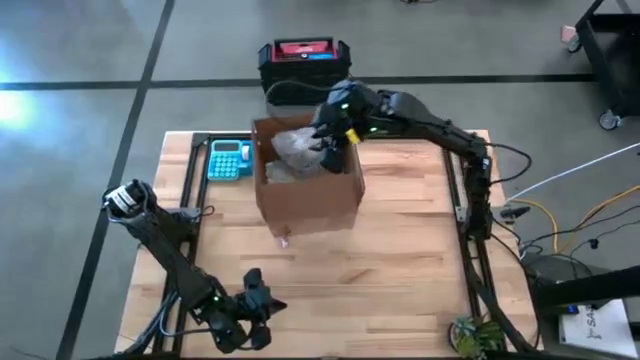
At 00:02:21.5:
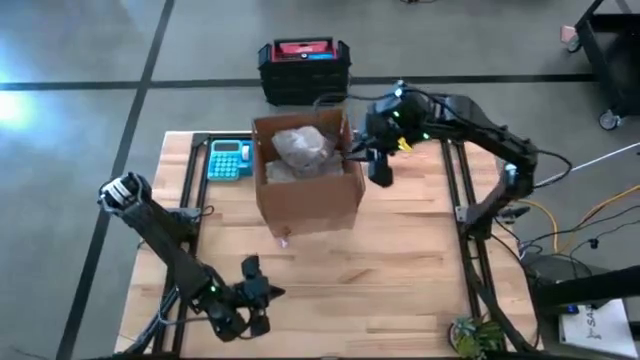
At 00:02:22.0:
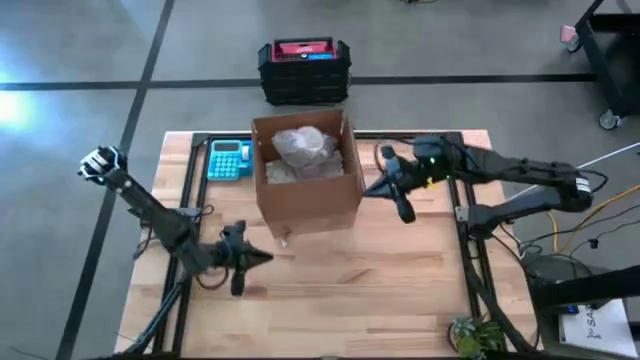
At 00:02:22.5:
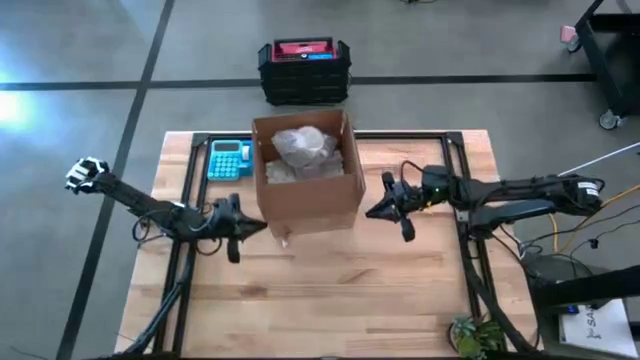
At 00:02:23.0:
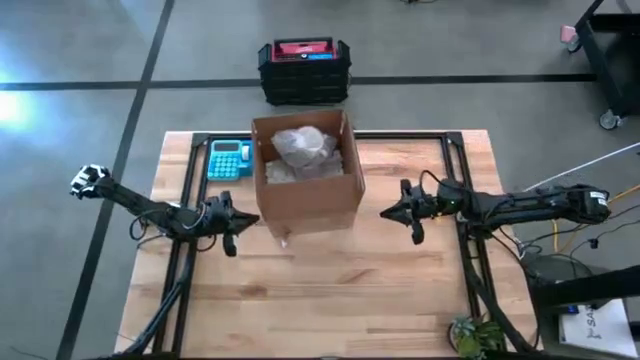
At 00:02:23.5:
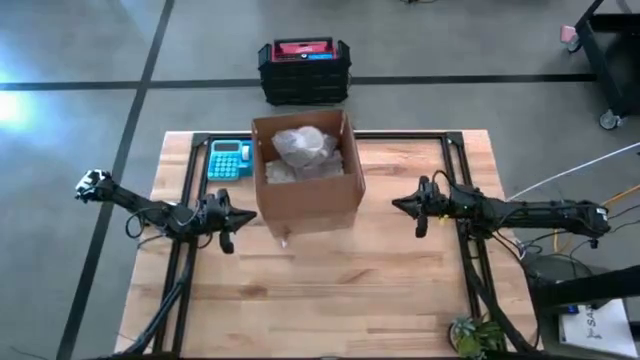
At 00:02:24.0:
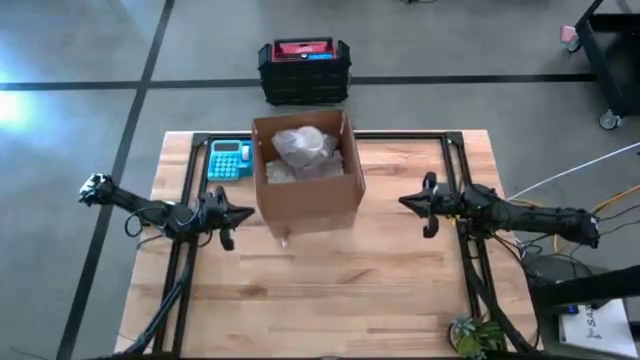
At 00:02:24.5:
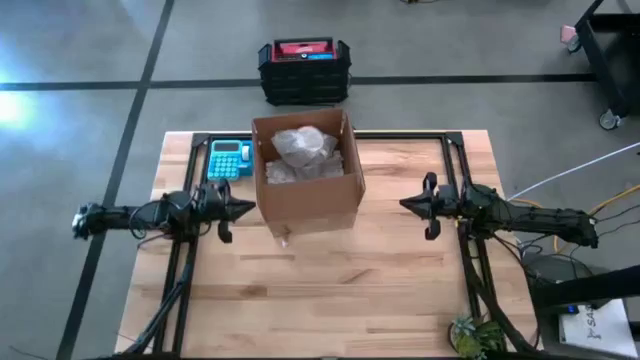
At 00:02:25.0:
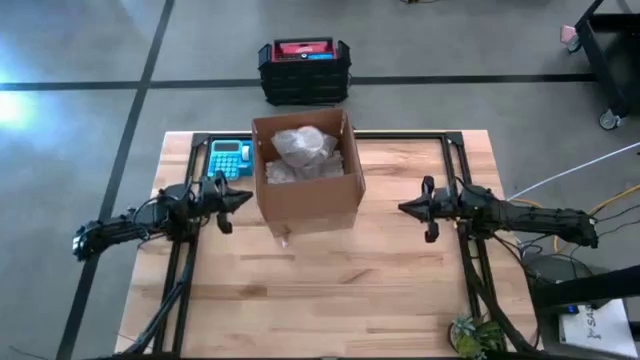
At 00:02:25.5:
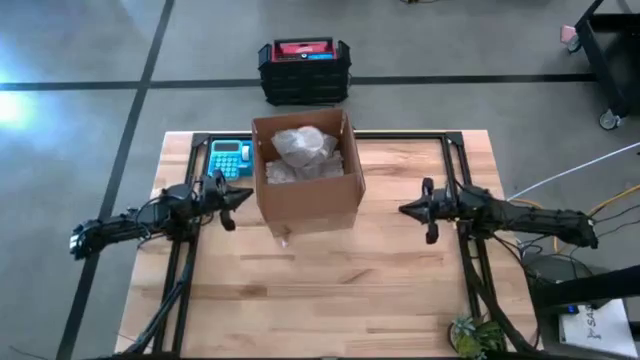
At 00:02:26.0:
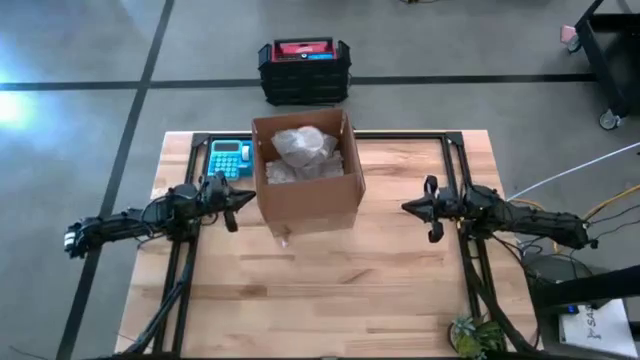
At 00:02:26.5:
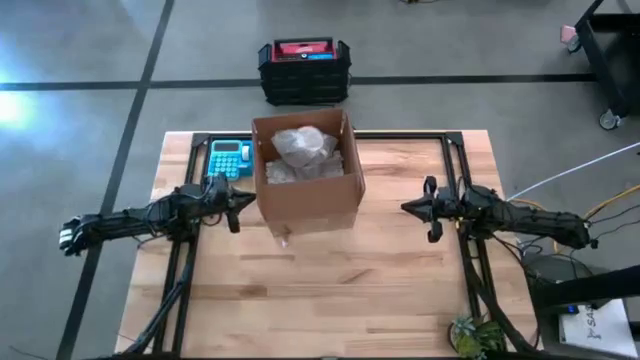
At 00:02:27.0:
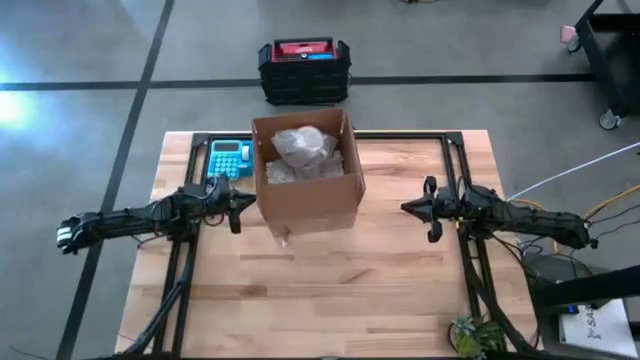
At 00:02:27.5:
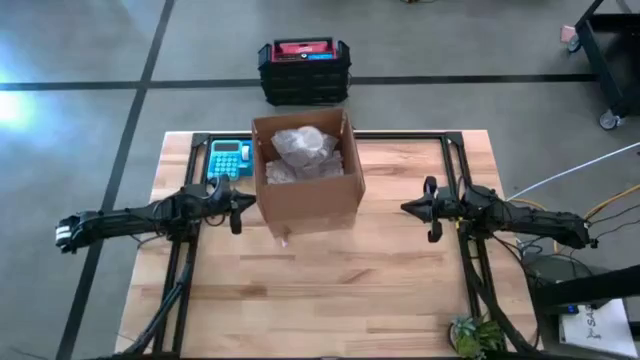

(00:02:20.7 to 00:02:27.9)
Task: wrap mug
Return to Home Position

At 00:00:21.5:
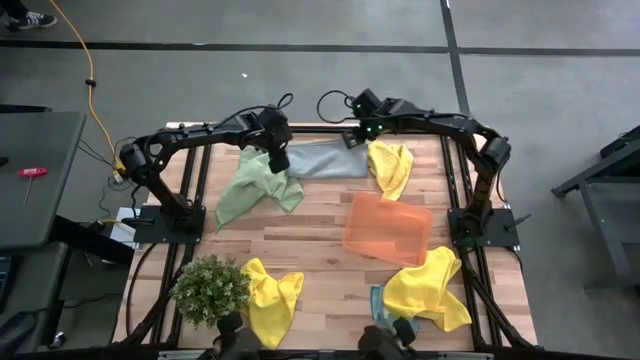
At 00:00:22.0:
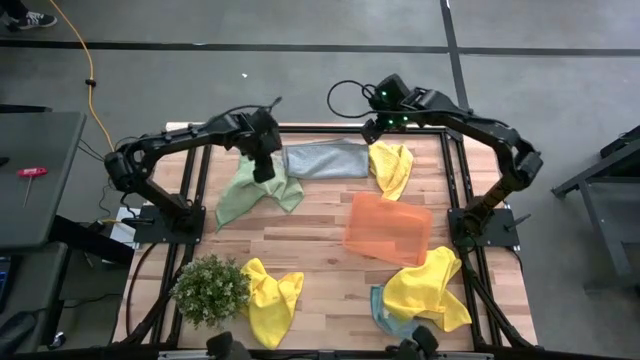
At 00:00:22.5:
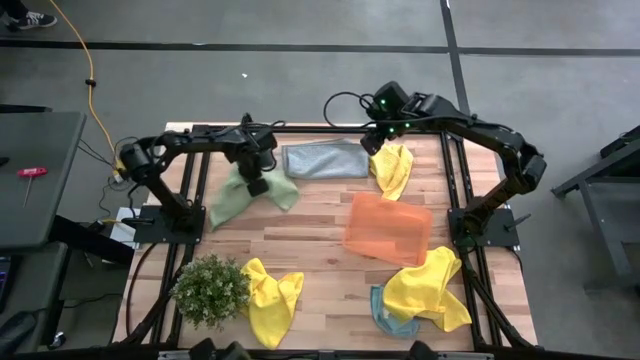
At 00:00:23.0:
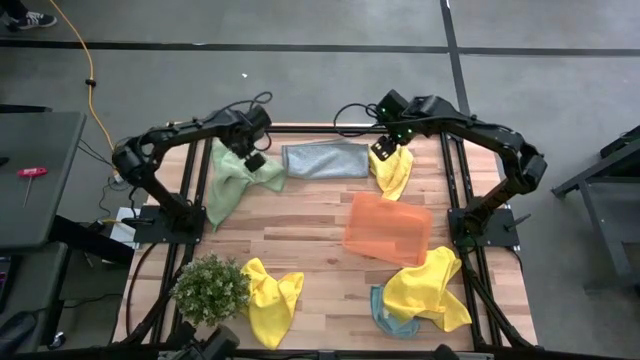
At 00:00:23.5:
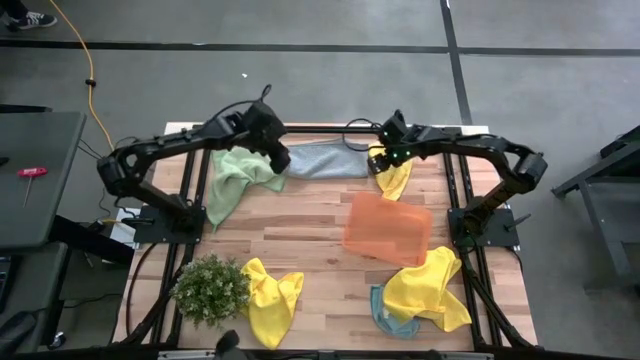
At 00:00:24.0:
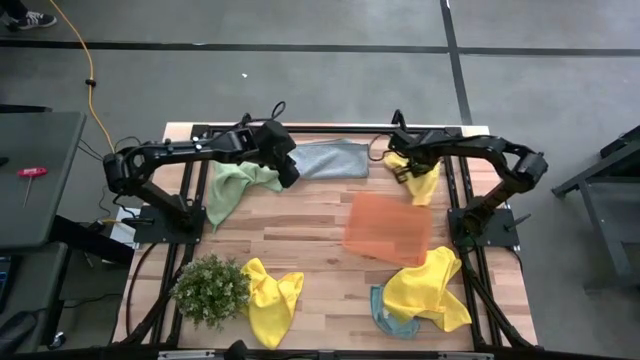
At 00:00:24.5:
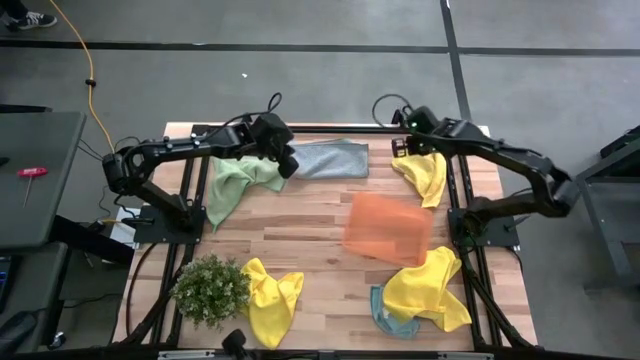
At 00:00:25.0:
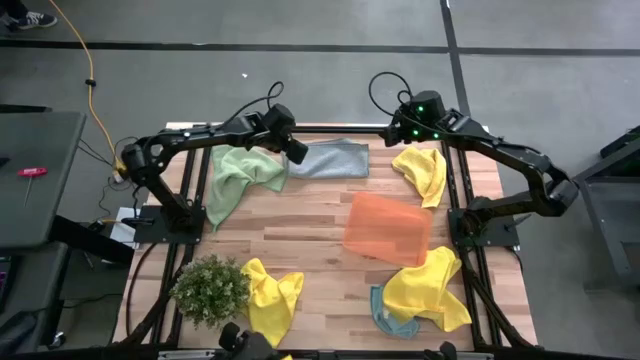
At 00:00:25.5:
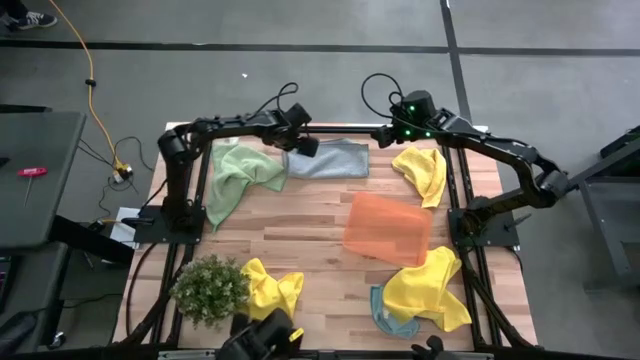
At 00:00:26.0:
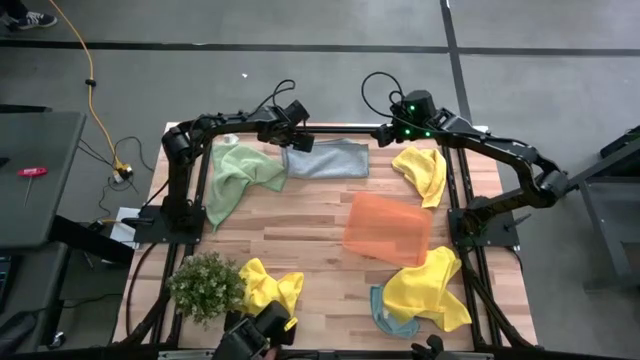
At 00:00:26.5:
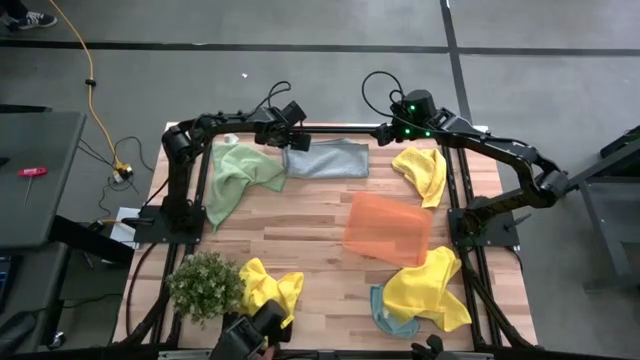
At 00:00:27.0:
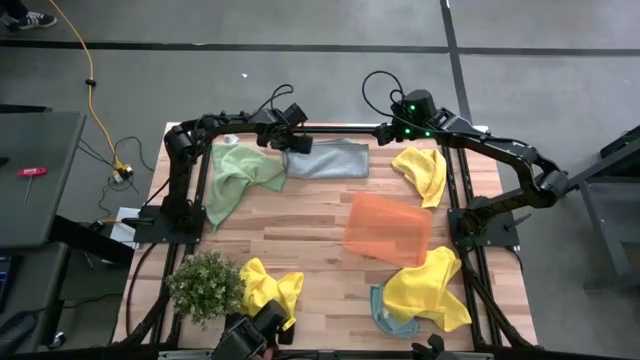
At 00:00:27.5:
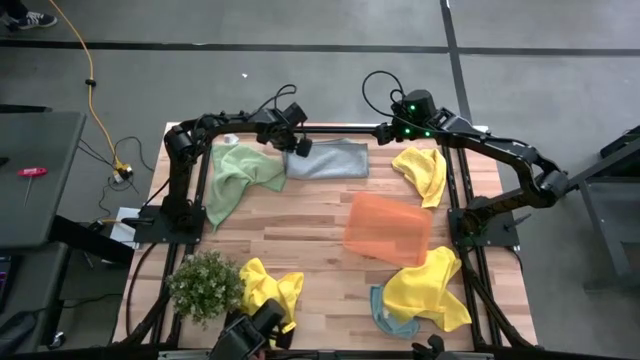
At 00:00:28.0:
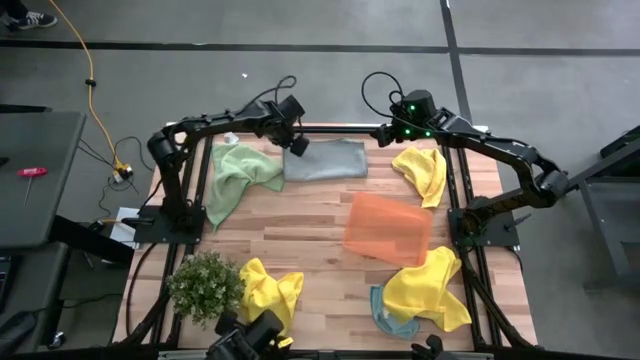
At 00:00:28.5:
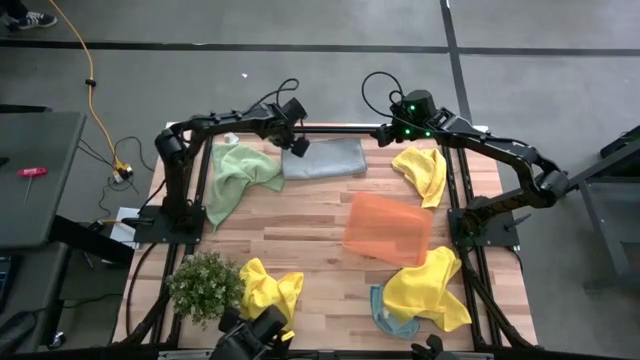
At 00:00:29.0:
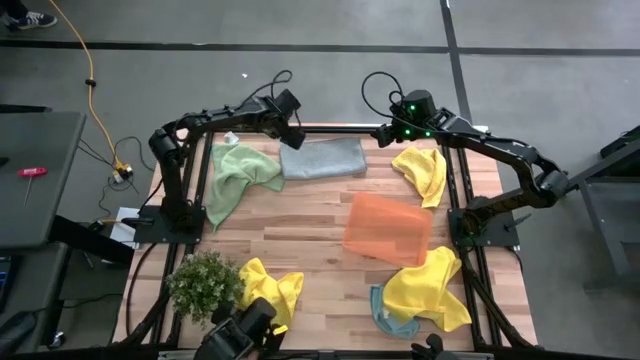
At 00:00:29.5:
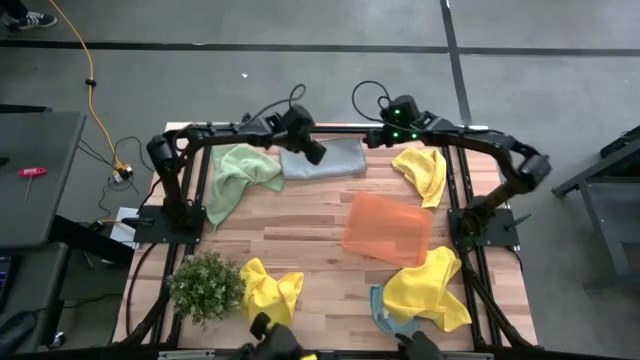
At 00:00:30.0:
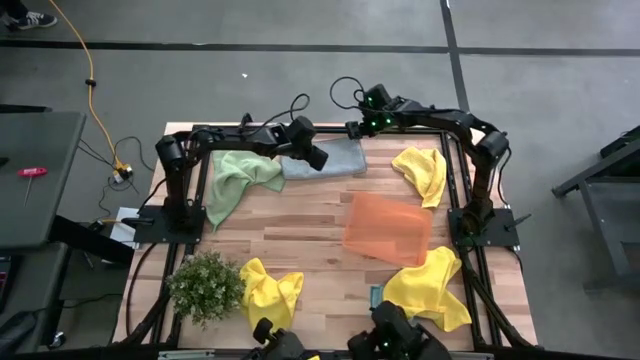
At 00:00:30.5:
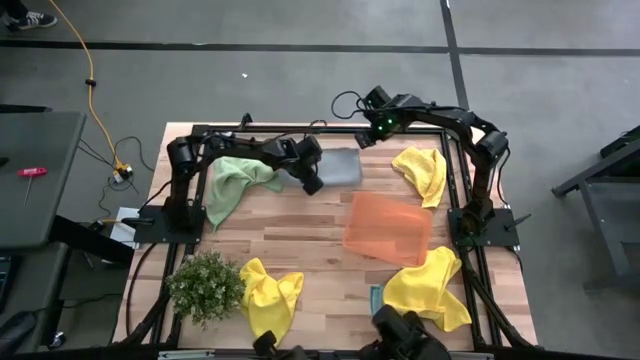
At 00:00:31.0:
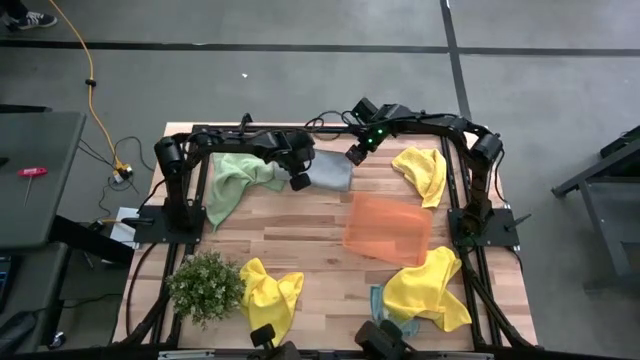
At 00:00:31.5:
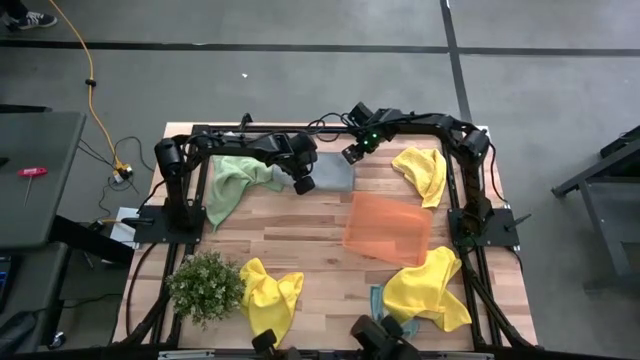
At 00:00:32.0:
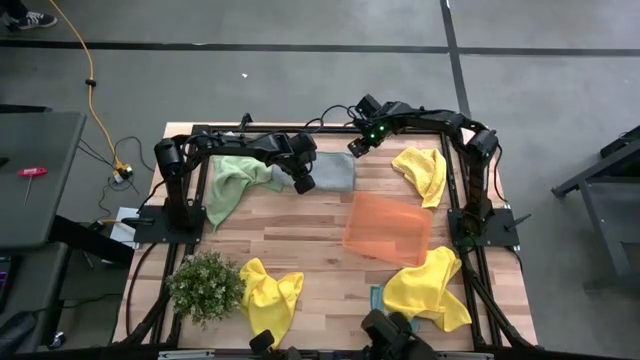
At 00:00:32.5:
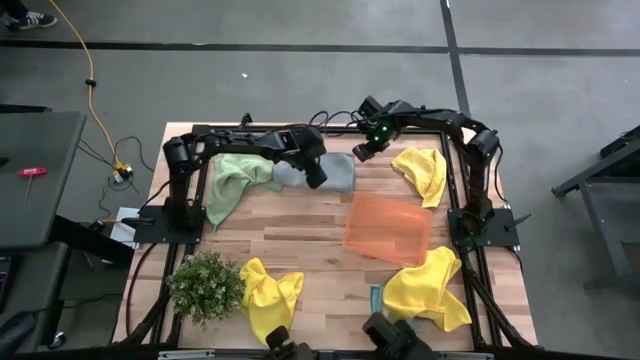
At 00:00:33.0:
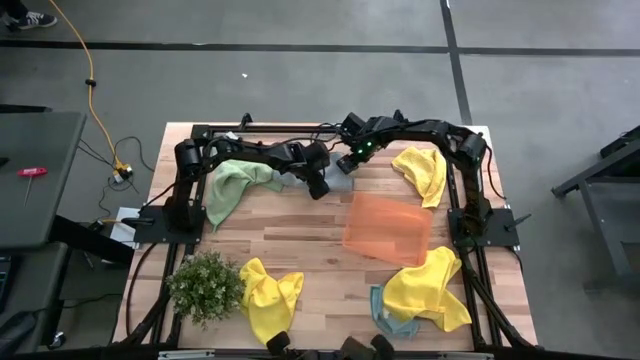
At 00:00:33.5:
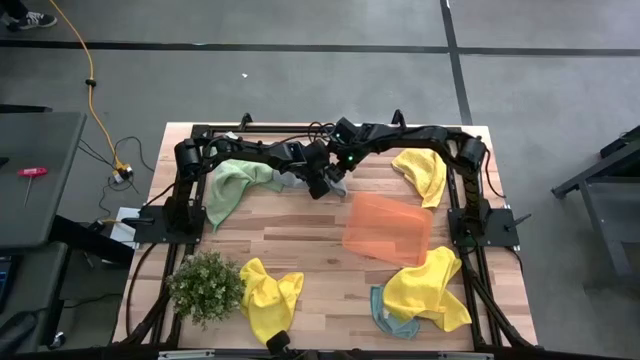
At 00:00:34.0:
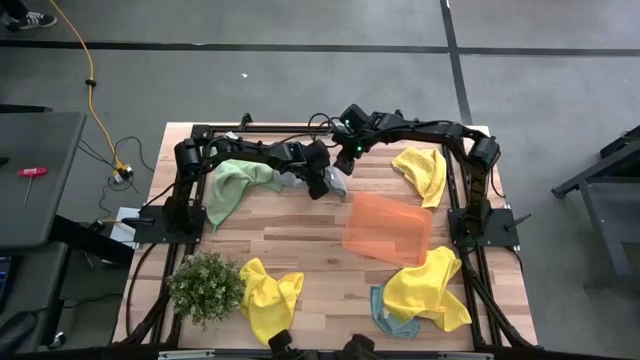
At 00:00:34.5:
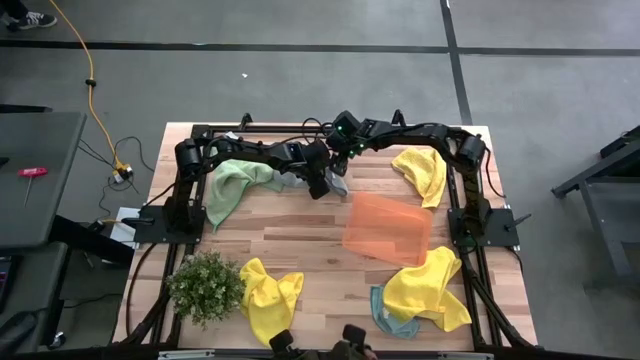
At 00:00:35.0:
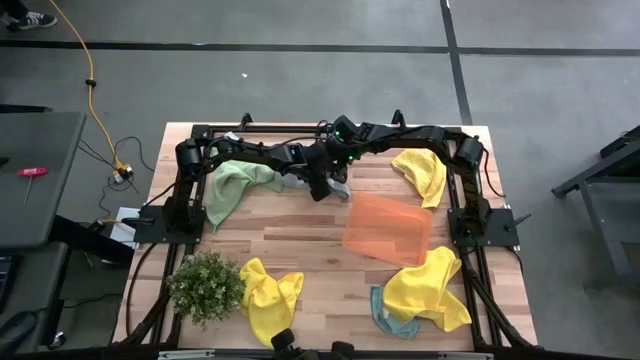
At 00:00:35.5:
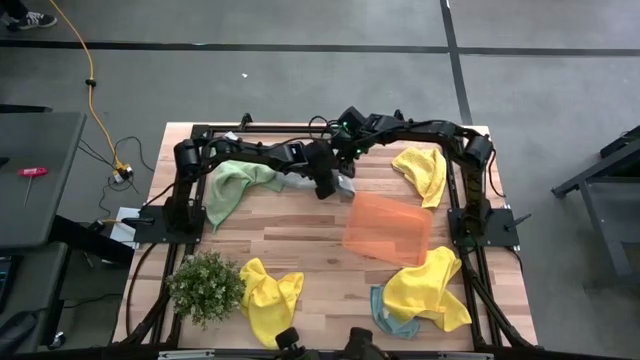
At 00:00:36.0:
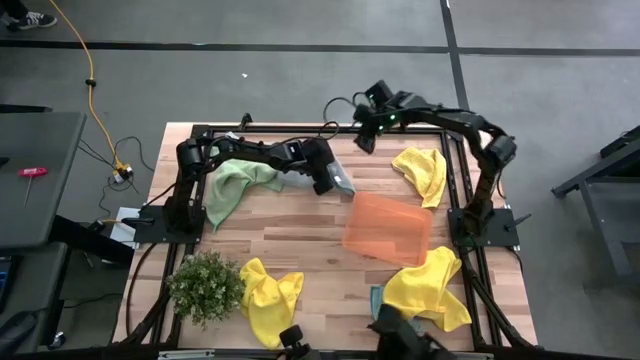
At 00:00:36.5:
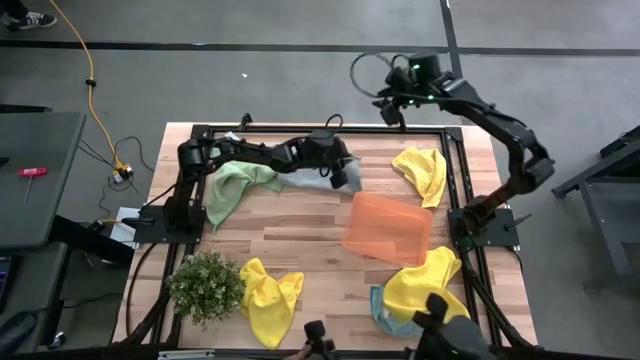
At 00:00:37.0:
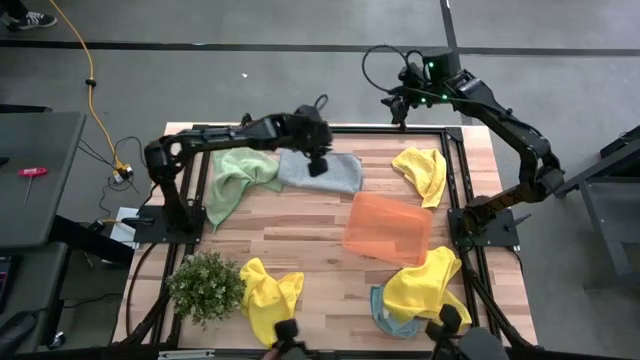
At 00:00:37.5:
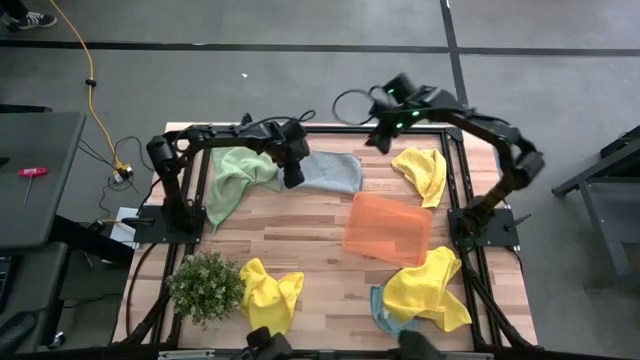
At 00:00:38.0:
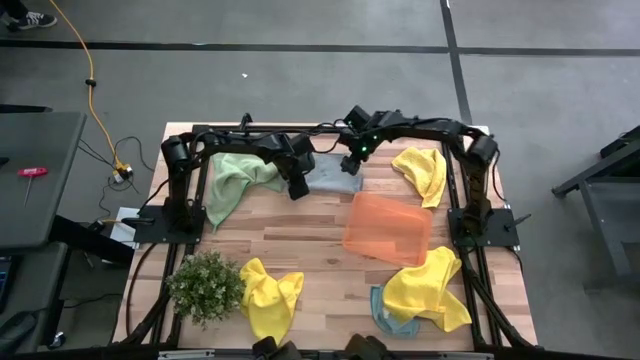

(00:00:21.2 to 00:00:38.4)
Task: Fold microfiber towels
Fold the gray microfiber towel
